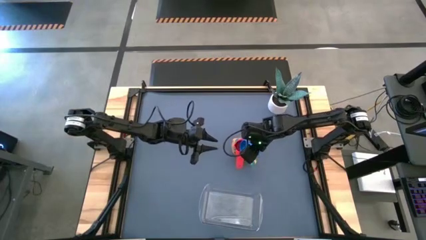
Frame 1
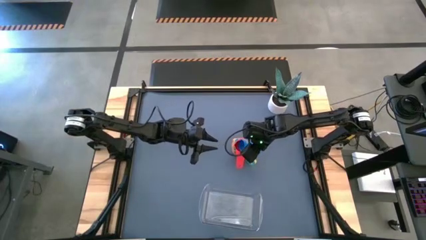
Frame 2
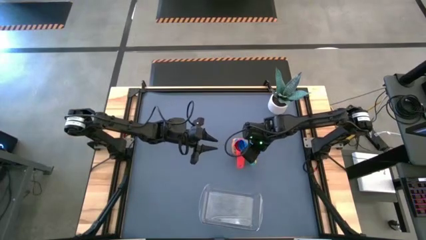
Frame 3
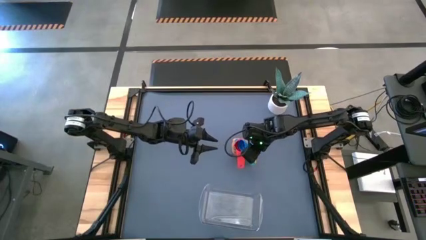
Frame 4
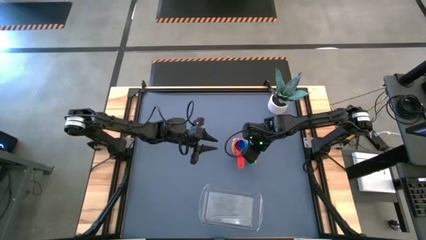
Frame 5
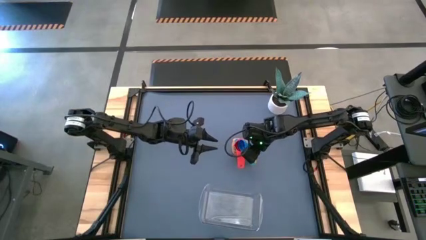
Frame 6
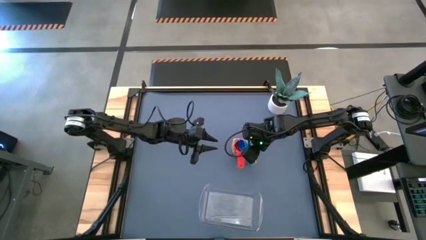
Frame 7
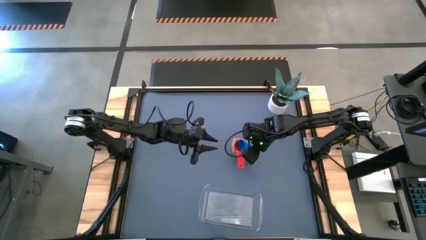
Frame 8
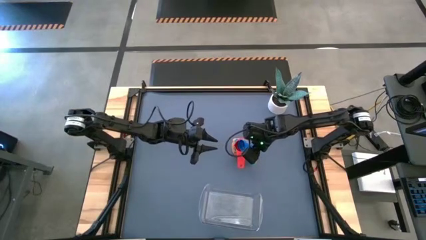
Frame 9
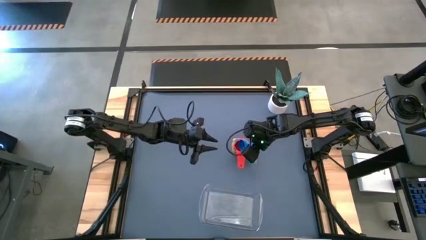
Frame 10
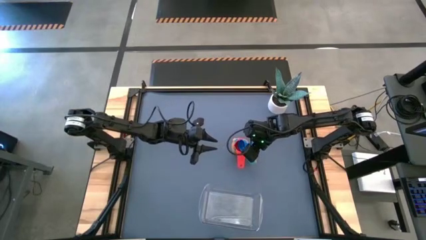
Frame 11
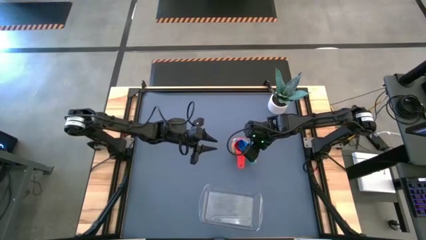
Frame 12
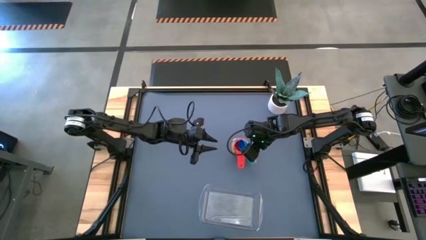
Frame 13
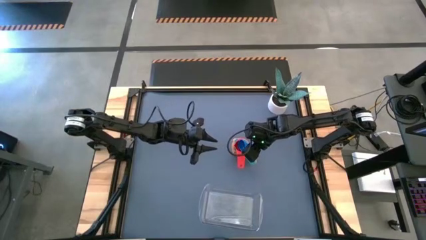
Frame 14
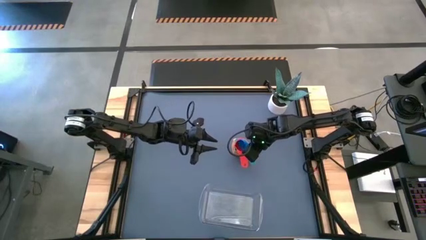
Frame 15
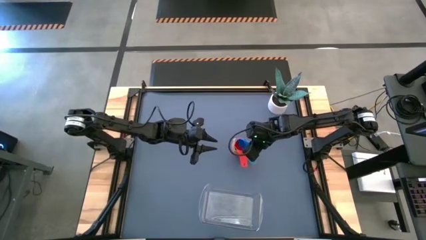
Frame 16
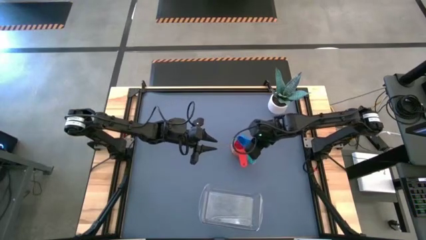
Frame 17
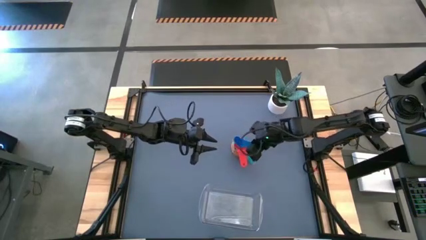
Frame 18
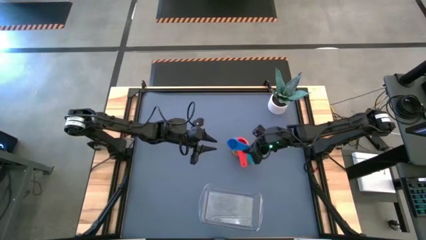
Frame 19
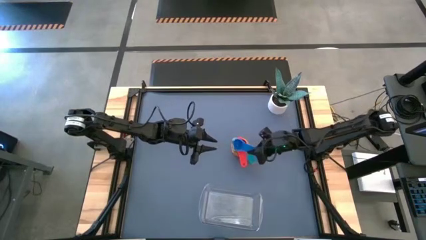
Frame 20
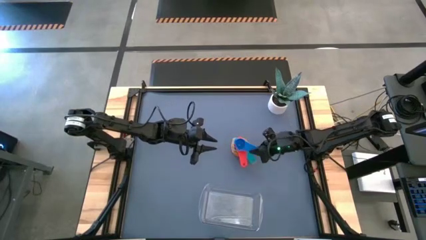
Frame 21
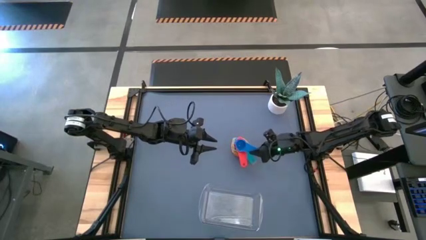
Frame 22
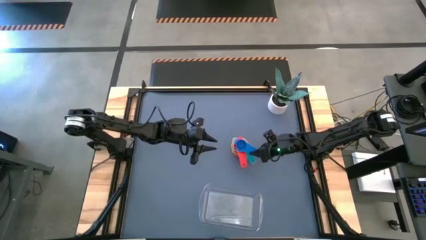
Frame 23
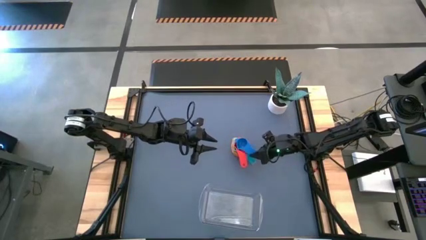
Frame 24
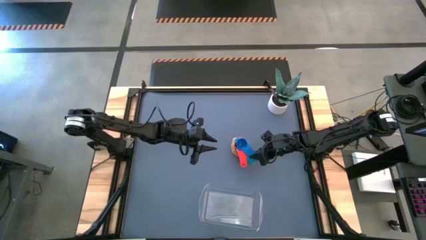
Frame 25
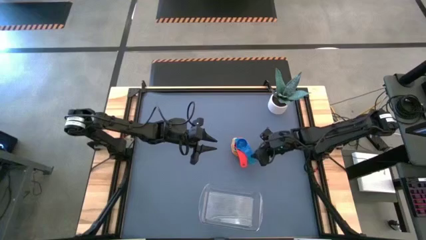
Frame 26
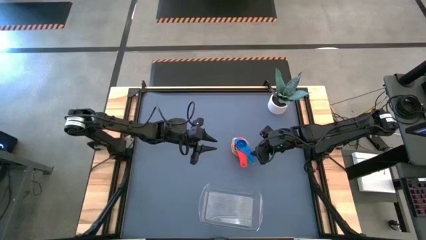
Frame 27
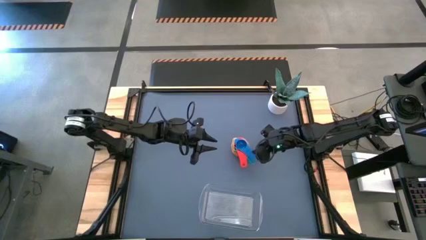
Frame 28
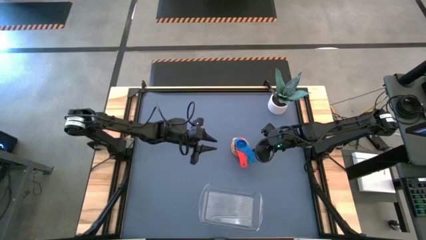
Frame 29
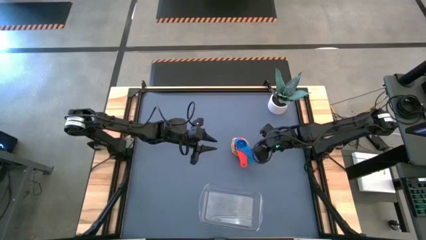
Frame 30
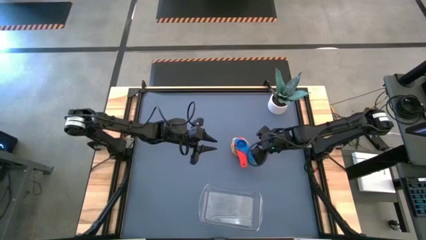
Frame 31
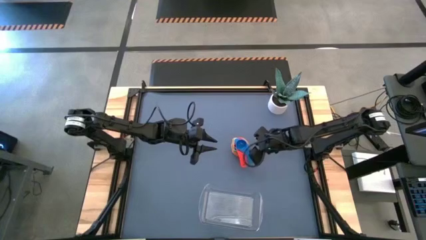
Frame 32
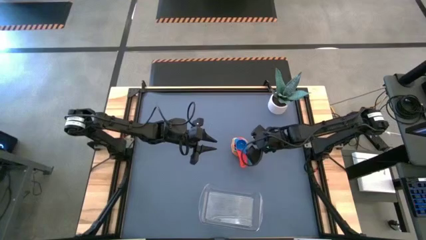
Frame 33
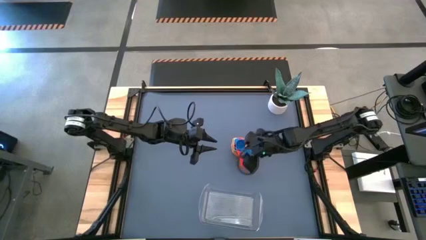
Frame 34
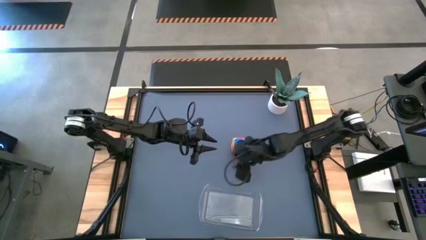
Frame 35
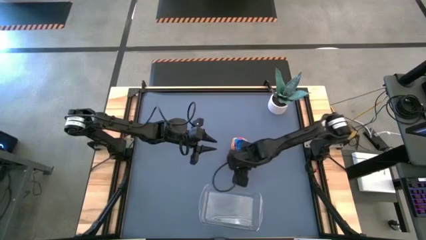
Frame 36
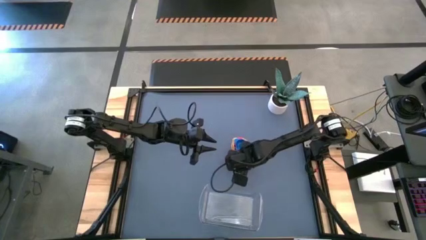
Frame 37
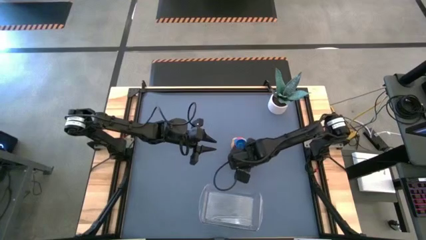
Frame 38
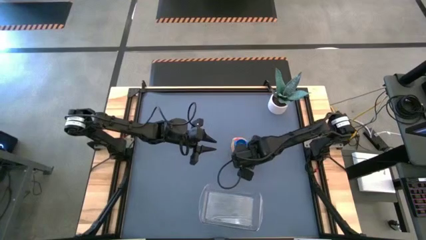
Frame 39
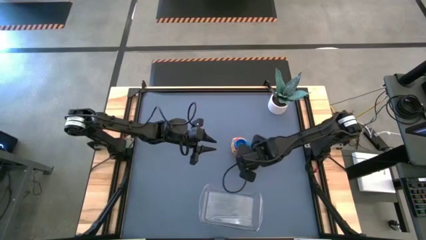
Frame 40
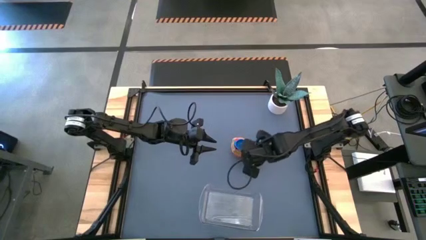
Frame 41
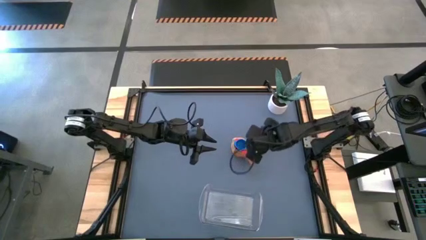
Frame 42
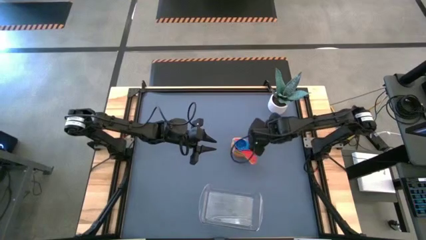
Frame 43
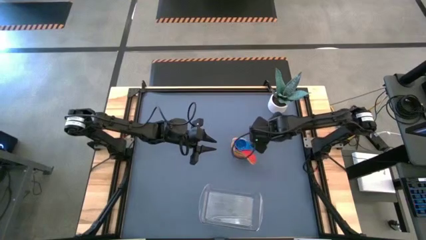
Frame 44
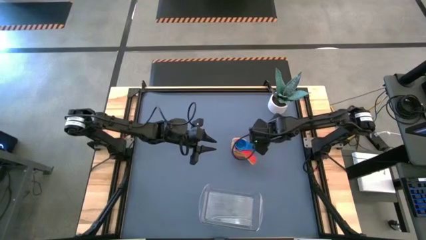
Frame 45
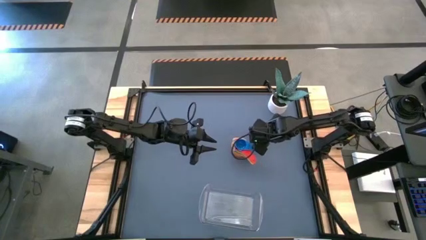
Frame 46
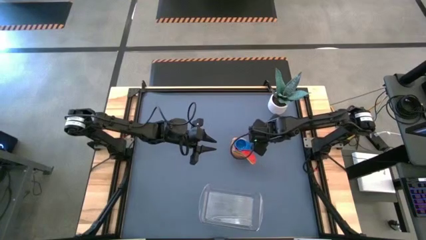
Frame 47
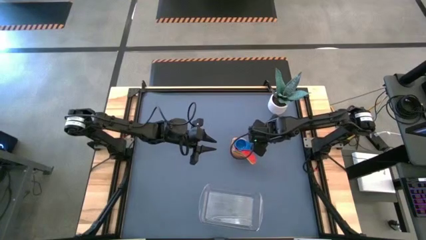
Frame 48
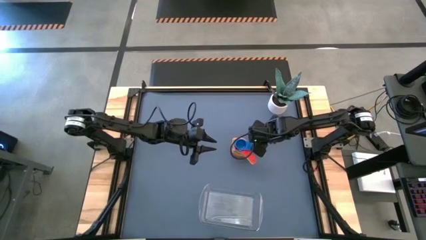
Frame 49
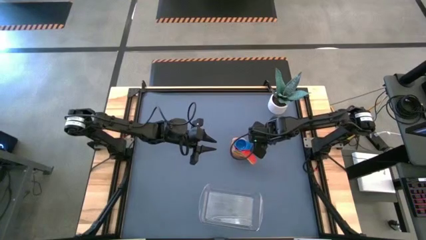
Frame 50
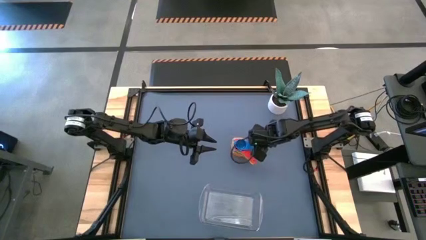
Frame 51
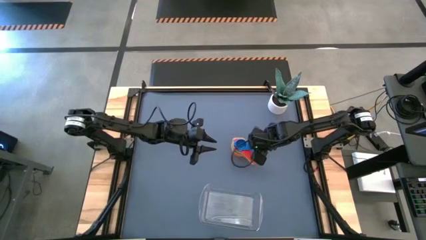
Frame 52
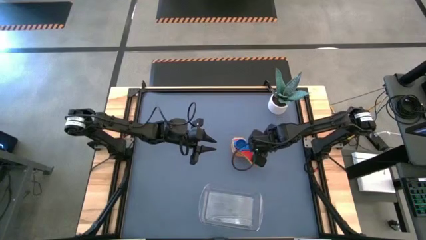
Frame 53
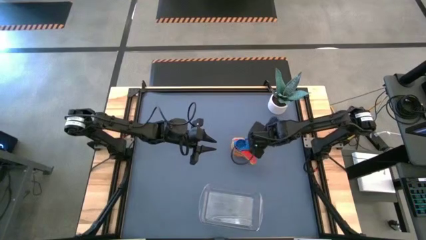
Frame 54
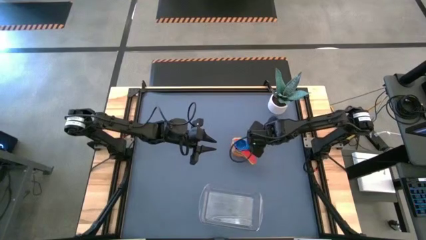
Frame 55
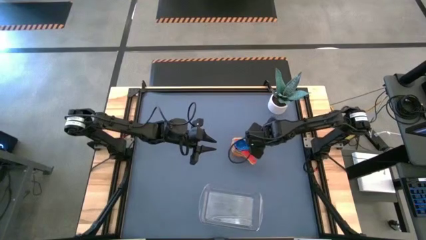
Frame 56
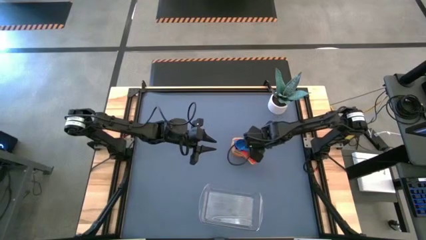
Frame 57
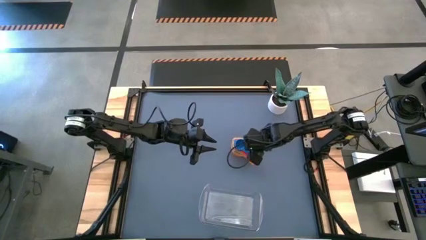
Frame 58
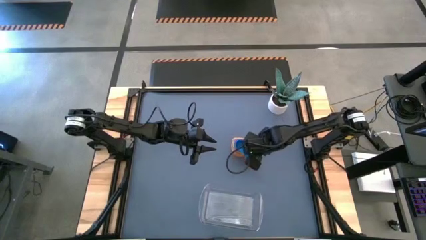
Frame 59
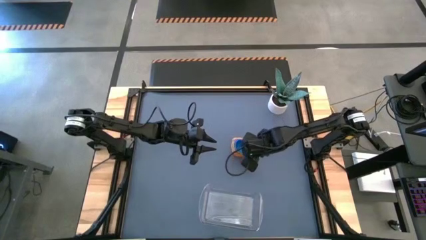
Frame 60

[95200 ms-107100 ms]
Task: Nest measuring cups in basket
Stack the blue measuring cup on top of the orange measuring cup

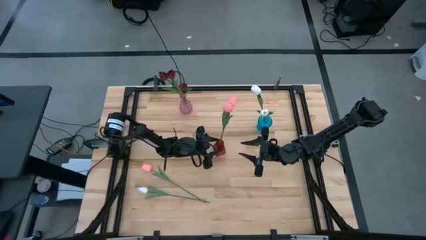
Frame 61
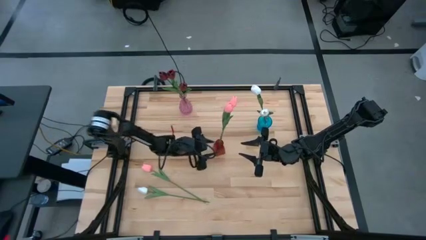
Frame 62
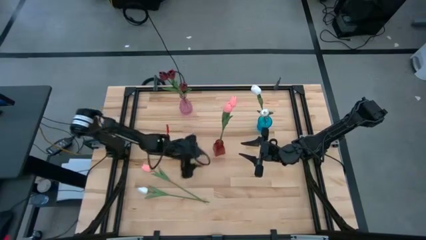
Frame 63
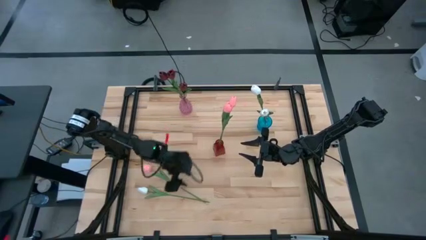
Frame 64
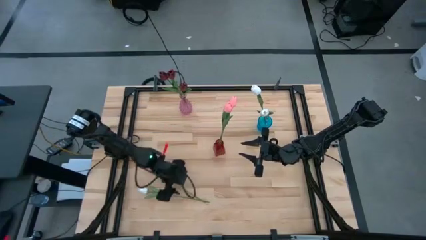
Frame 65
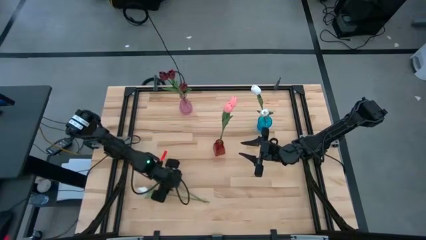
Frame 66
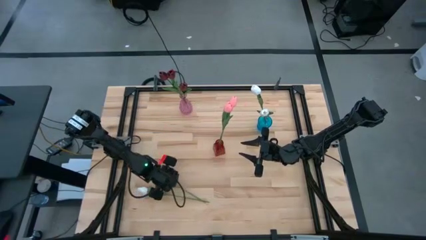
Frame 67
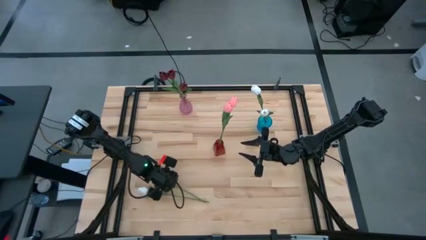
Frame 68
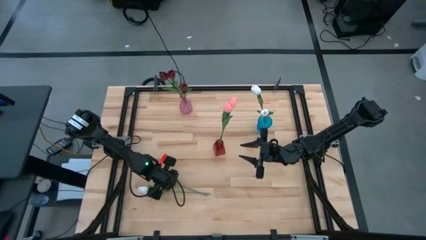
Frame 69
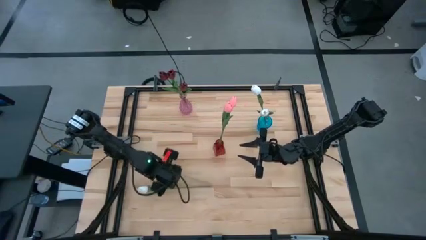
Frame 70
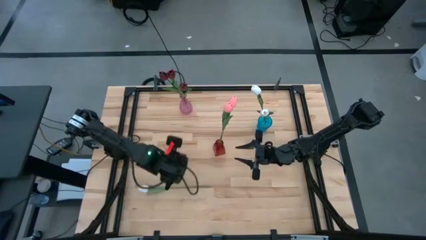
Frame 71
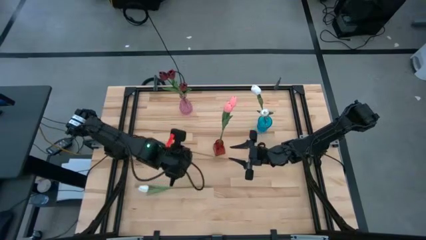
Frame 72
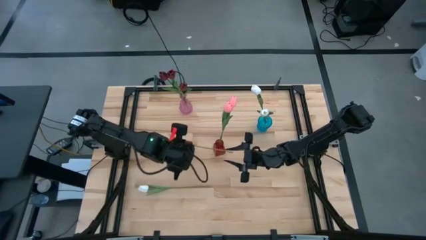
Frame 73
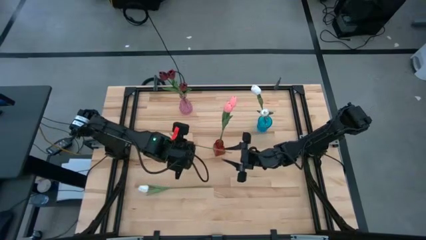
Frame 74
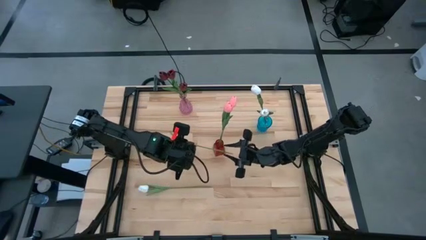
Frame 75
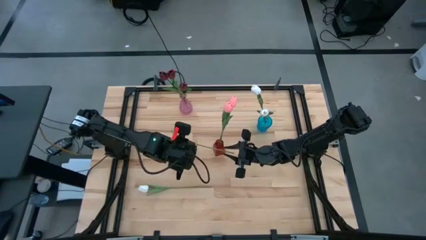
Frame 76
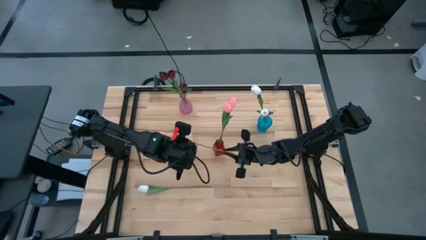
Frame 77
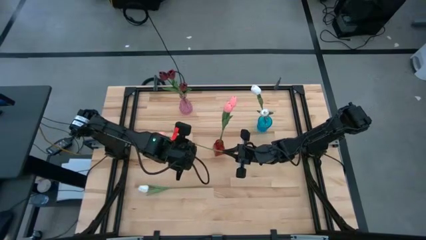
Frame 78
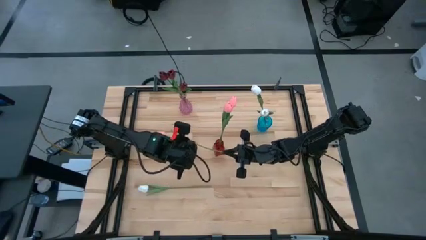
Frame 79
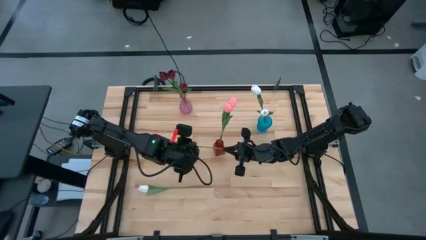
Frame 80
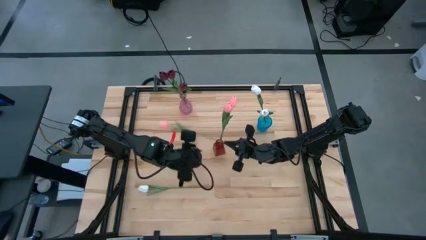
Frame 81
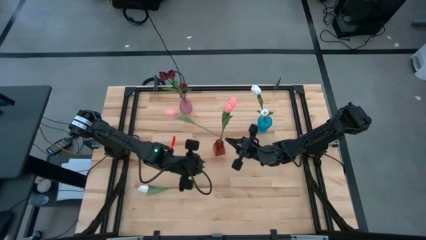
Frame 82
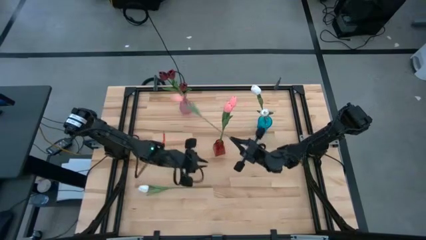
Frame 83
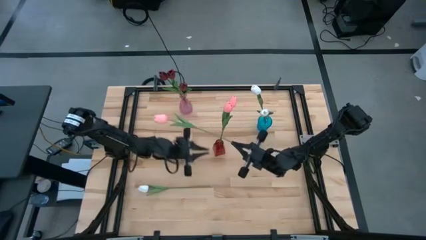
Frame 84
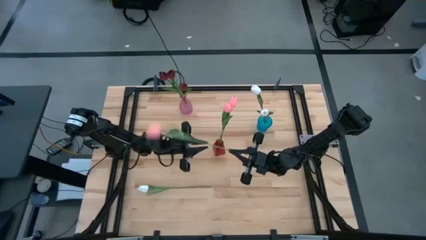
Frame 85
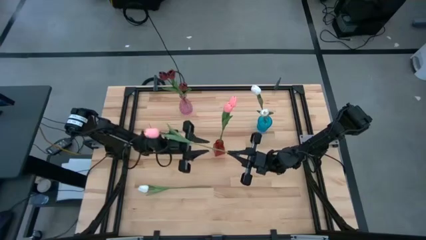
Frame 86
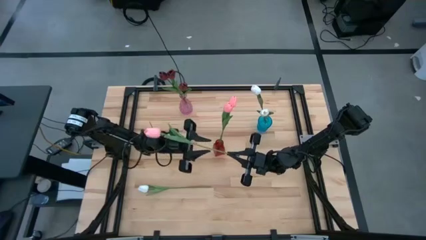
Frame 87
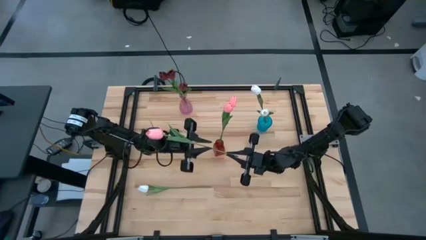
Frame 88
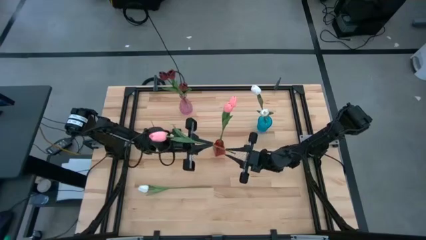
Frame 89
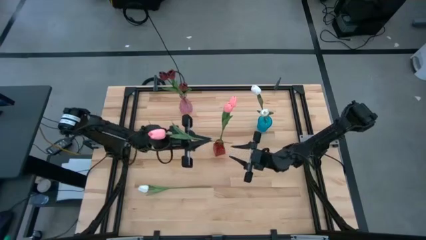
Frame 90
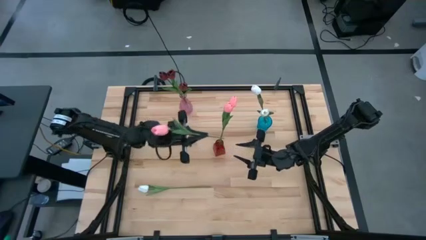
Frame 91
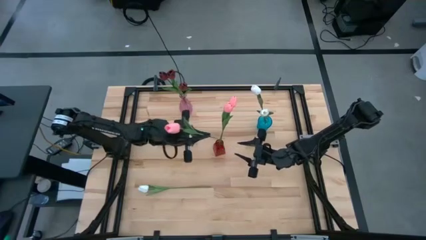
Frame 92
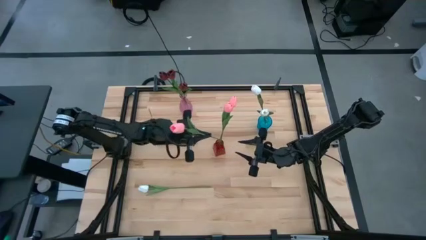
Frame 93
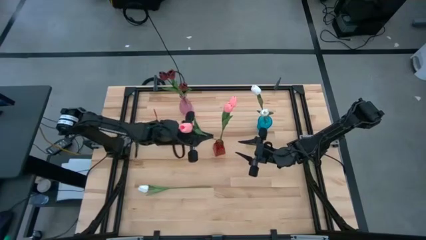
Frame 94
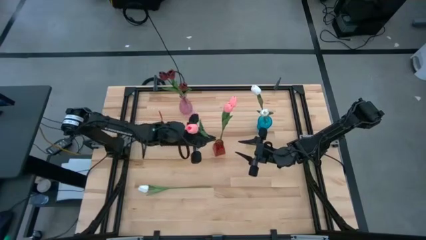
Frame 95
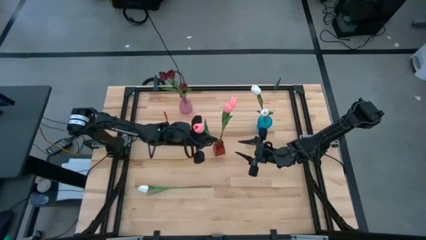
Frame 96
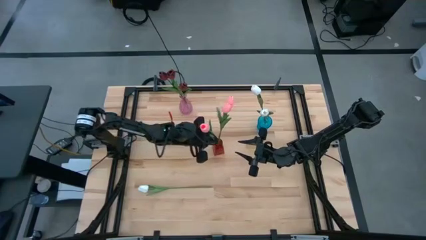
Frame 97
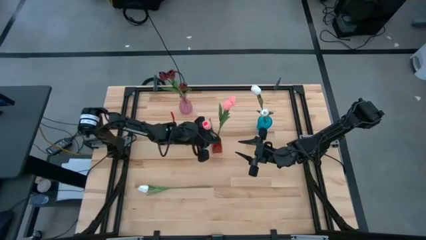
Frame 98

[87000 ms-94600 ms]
Task: Sort flowers into vase by color
Put the pink flower into the red vase
